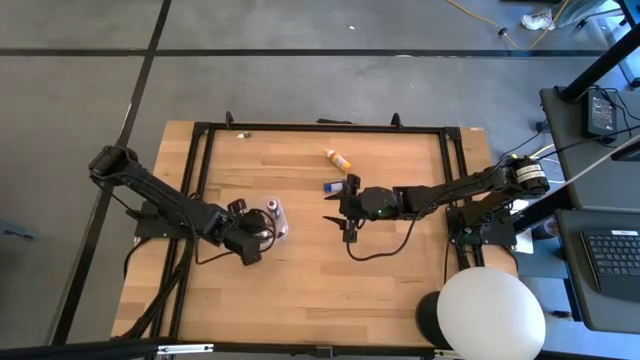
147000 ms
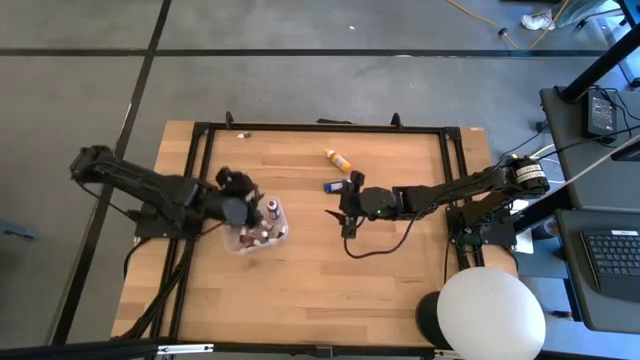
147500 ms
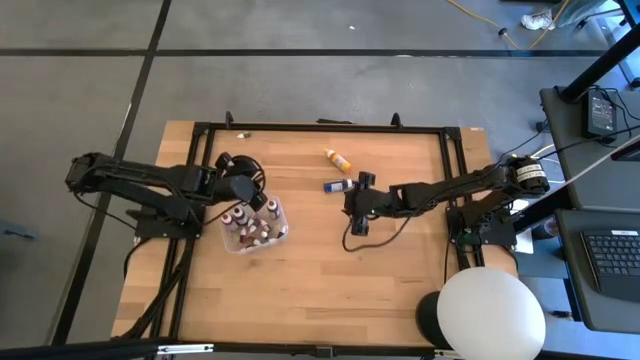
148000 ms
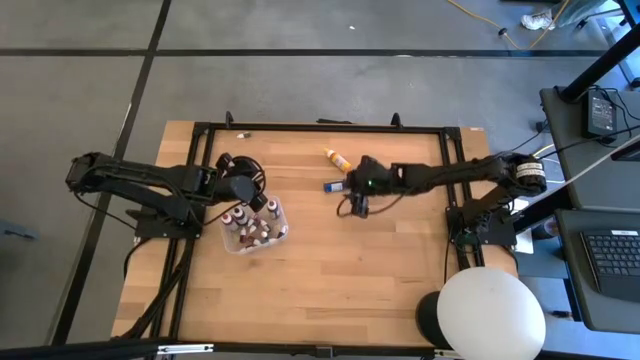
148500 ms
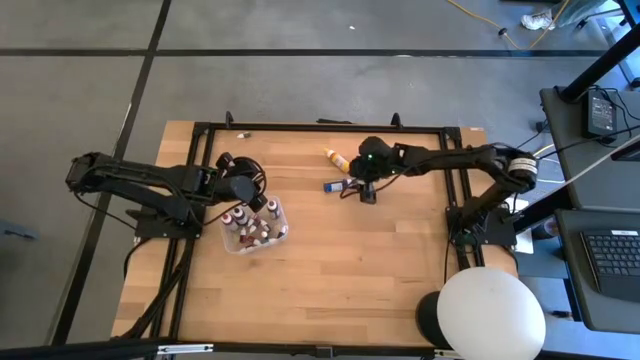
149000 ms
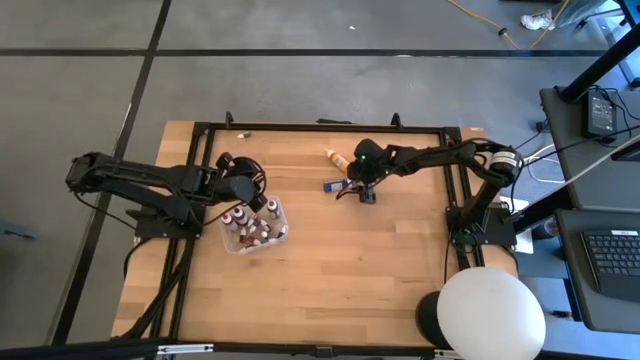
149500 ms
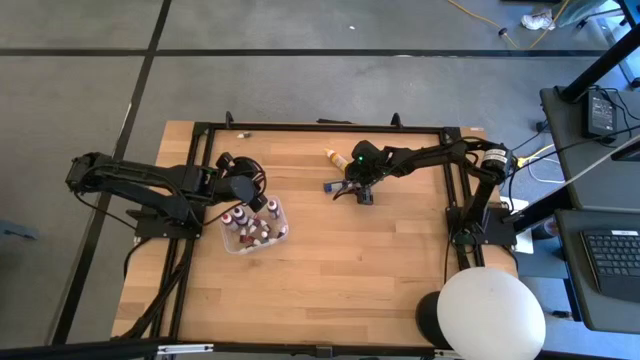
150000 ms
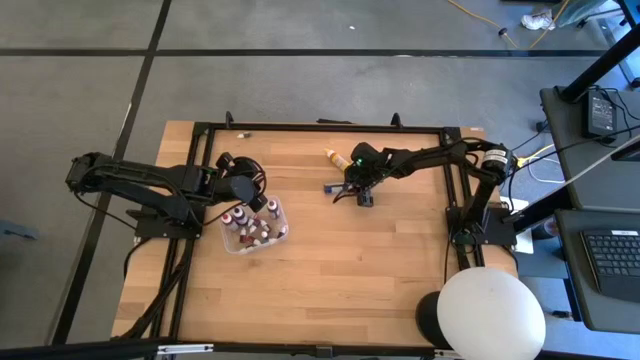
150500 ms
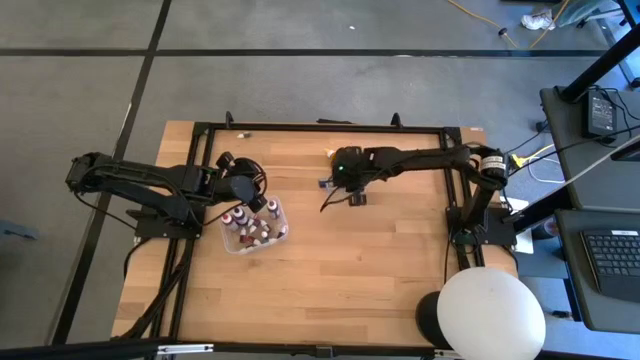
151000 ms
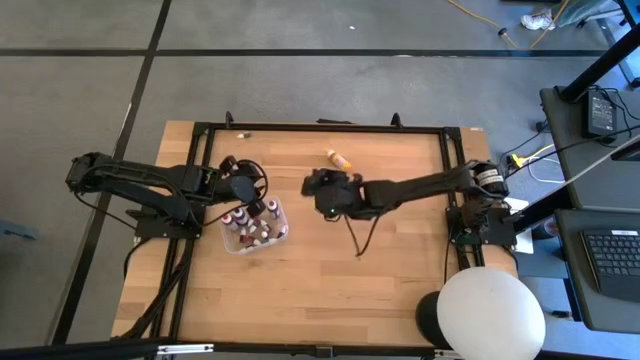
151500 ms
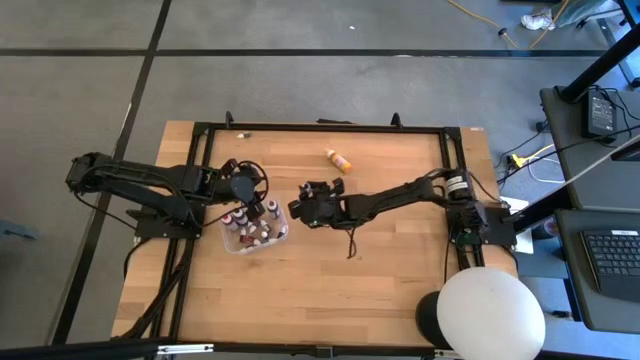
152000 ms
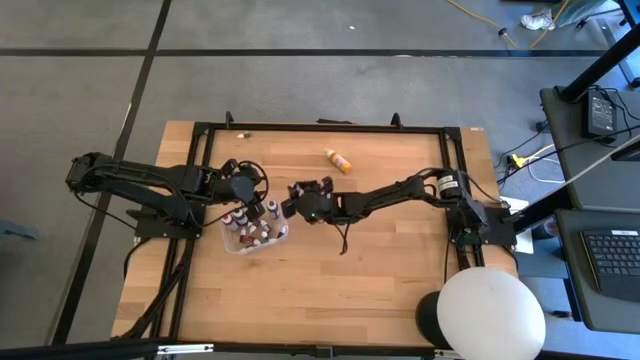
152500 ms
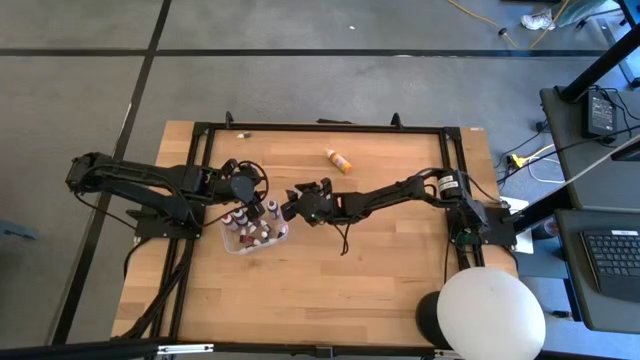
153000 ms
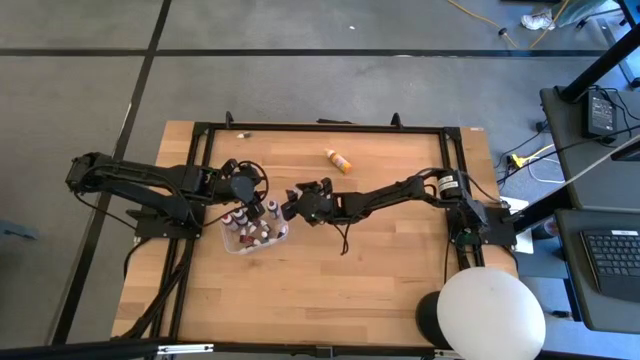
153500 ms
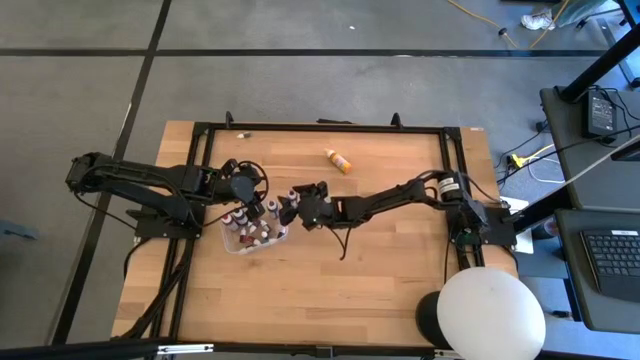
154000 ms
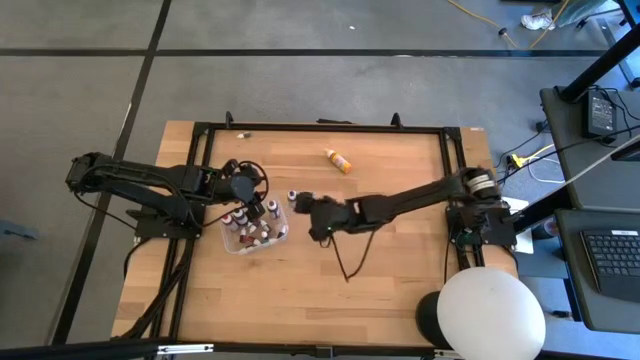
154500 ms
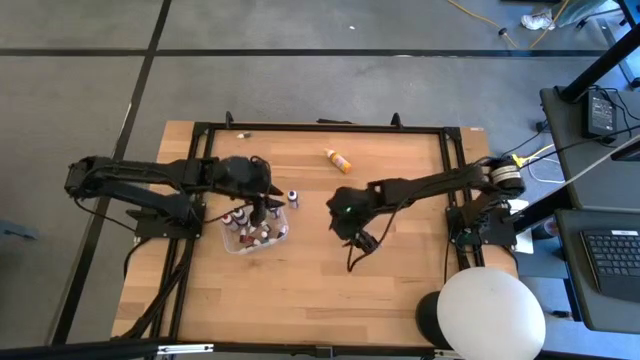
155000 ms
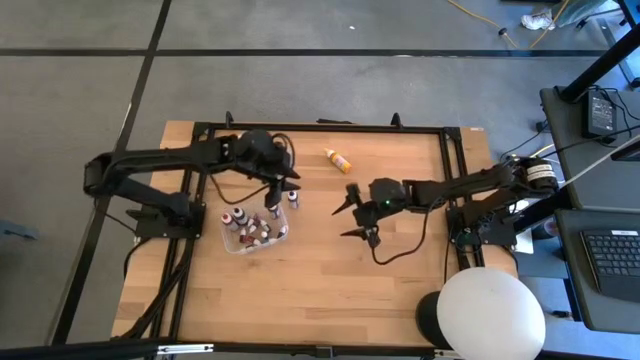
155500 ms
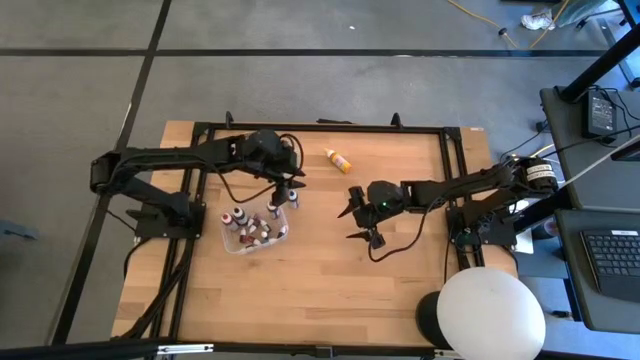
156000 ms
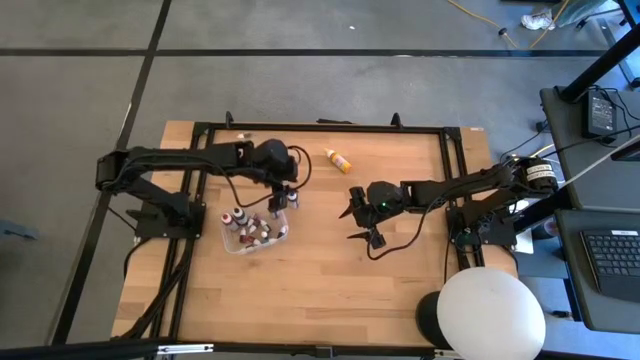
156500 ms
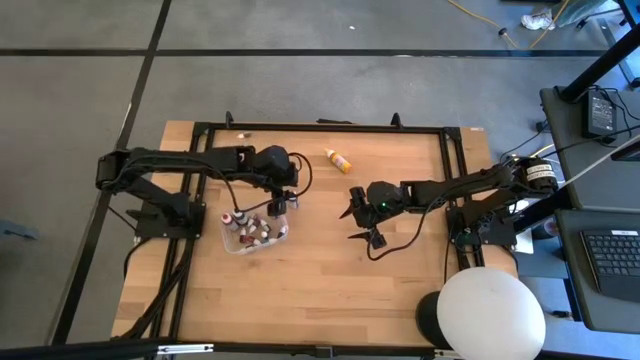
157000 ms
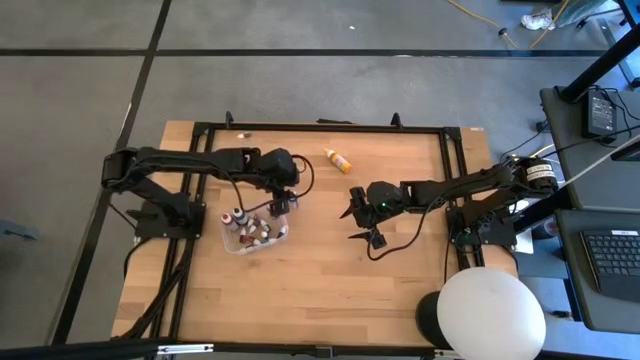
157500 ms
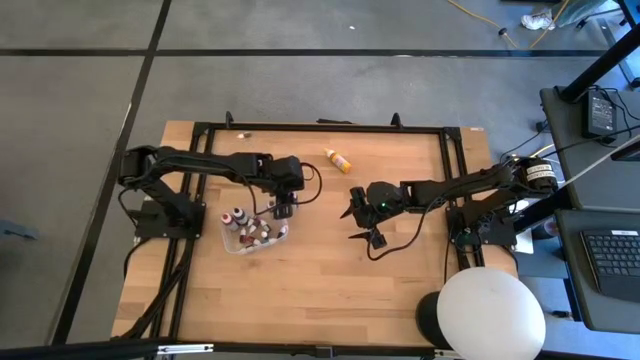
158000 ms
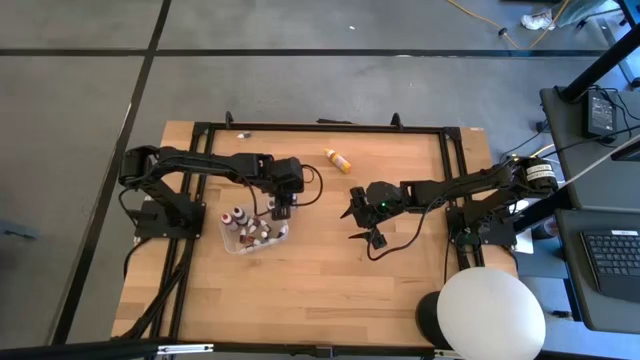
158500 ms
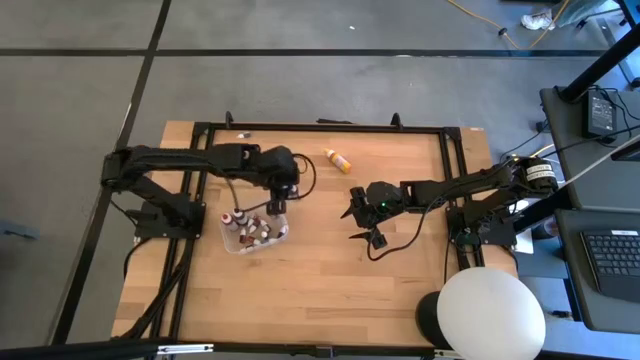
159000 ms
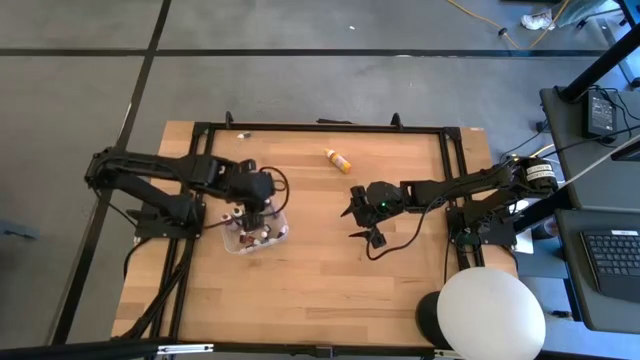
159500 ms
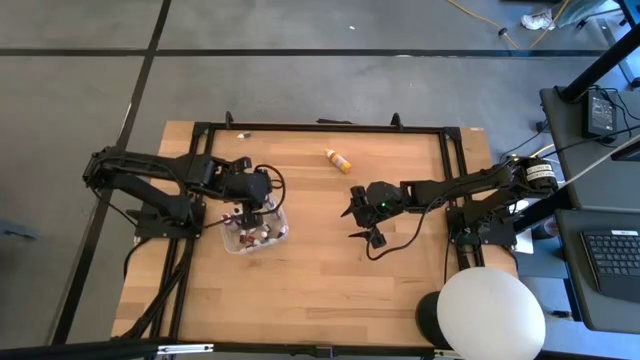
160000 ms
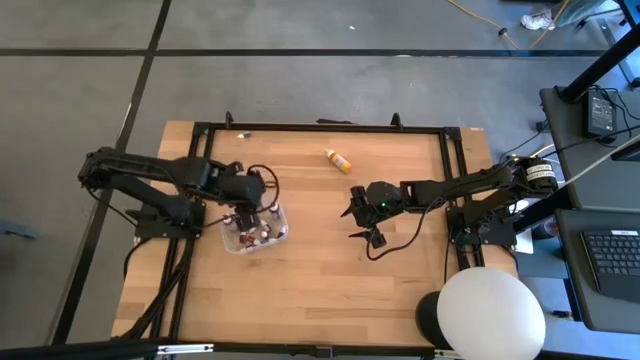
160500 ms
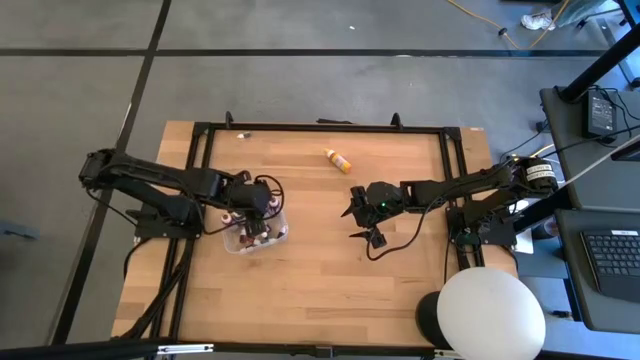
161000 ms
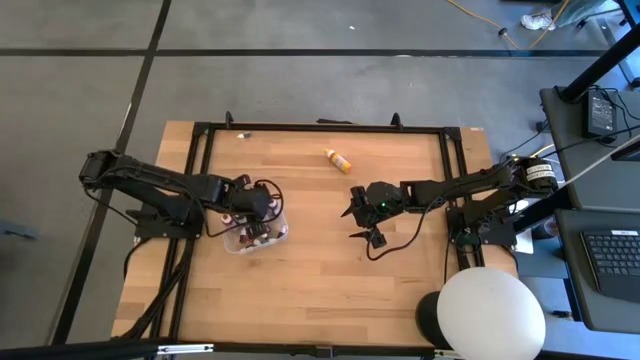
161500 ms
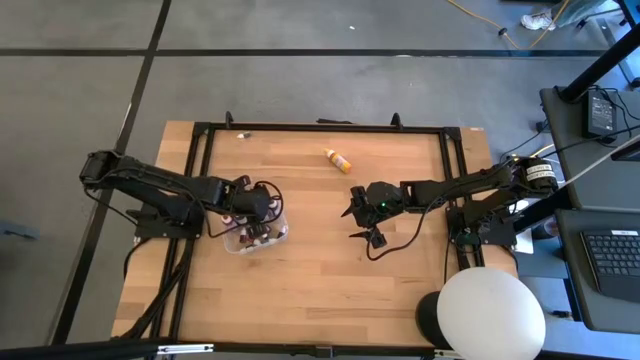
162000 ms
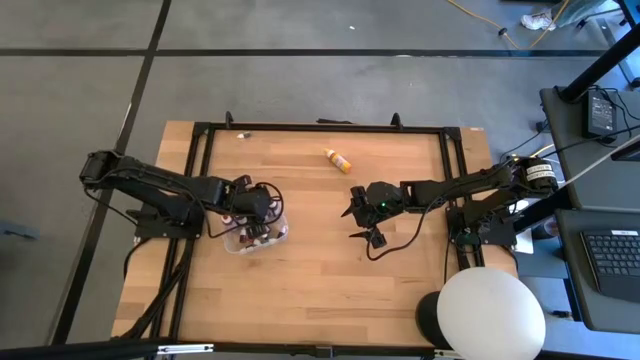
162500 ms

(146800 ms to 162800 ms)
Task: Pick & Place food coloring
Put the large blue food coloring bottle into the transparent bin

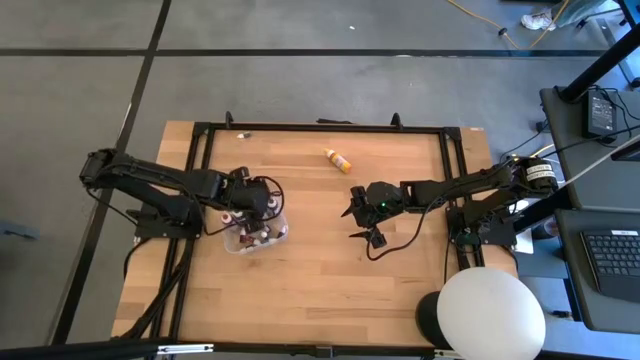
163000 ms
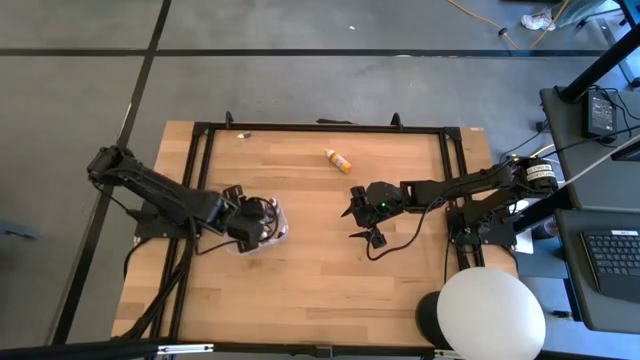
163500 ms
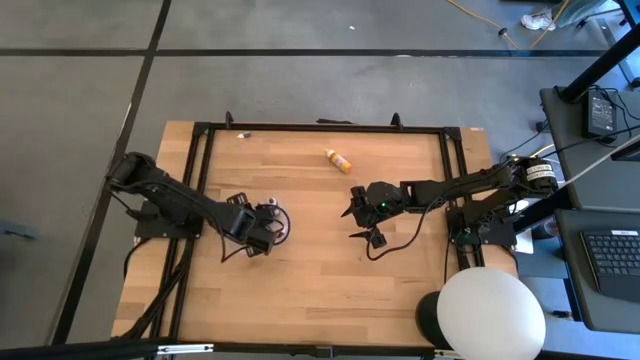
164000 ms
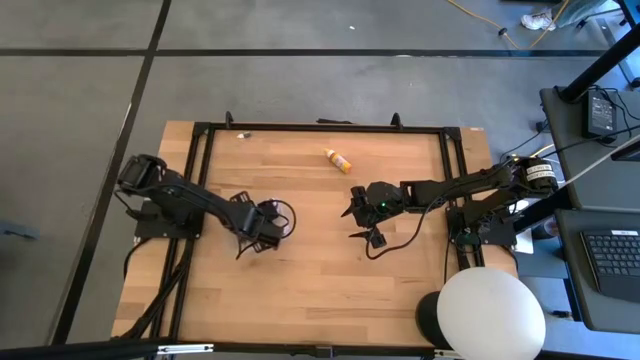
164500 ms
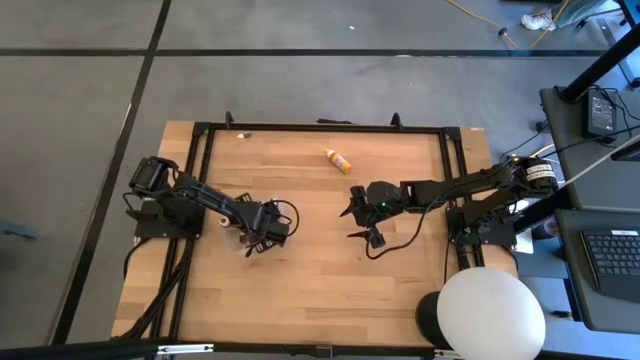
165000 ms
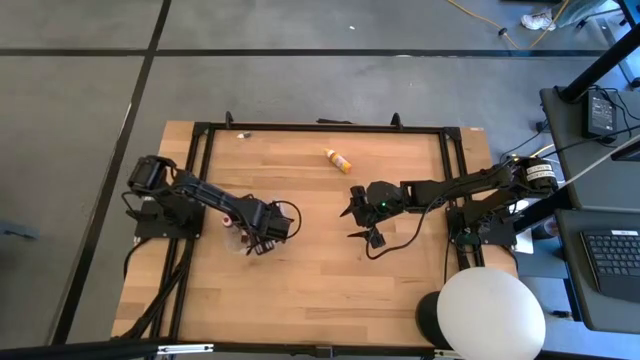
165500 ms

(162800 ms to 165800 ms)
Adjust the food coloring bottles in the transparent bin

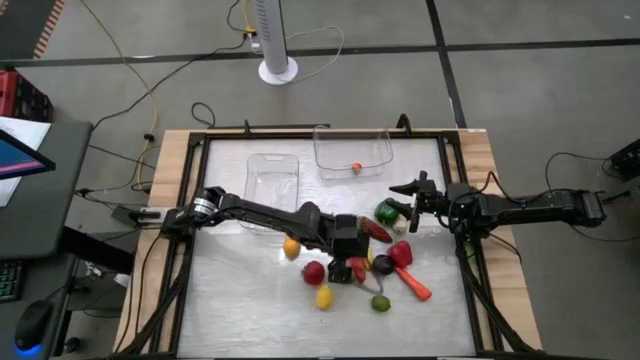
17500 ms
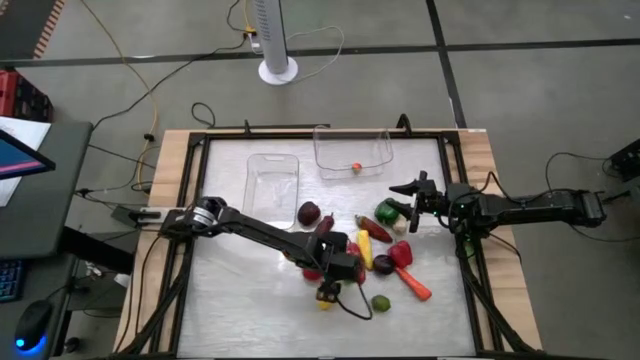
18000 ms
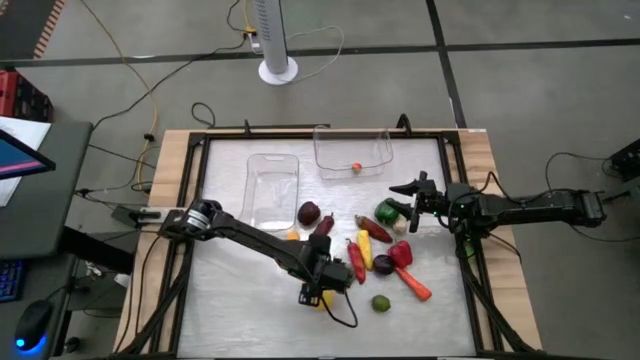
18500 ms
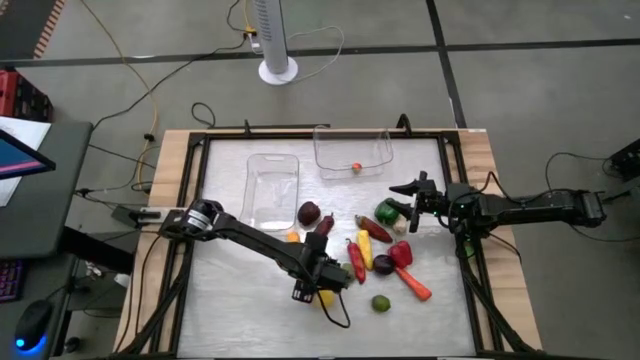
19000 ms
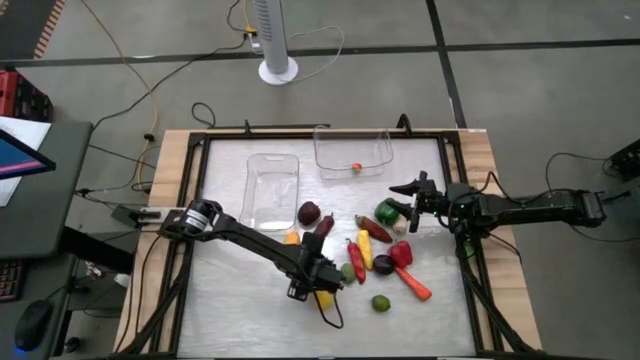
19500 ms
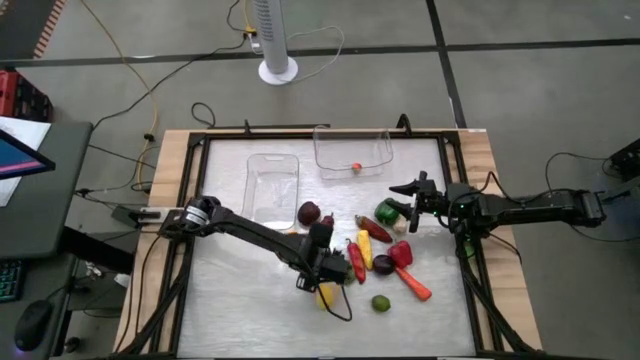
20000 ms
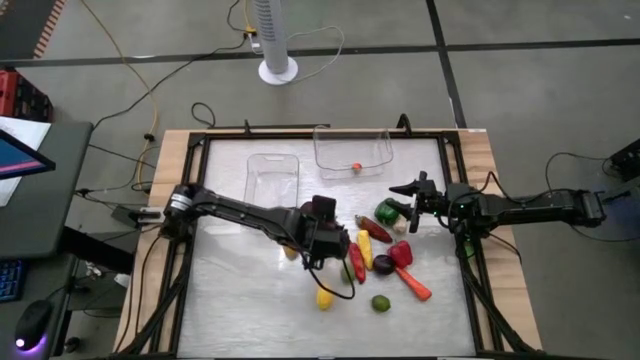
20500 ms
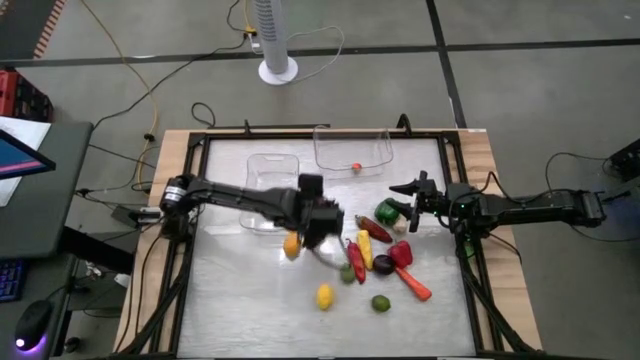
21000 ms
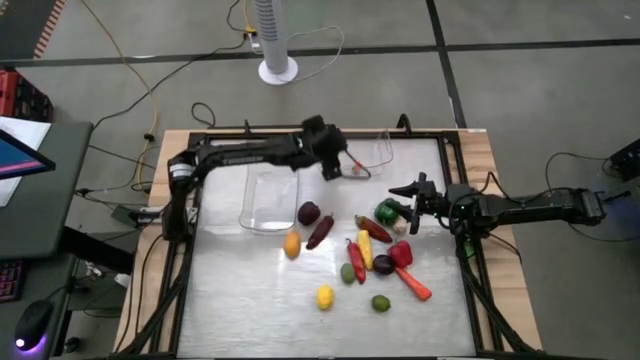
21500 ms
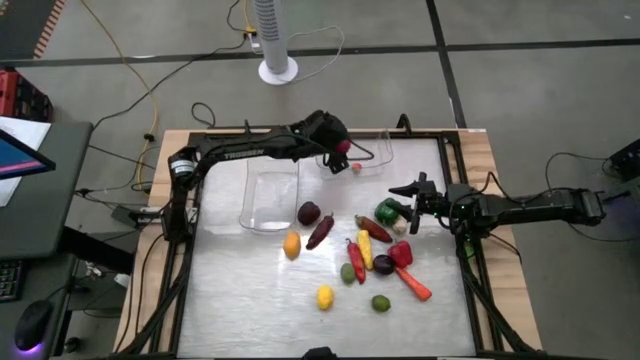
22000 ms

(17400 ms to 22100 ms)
Task: Sort produce into baskets
Put the red tomato into the right transparent bin
